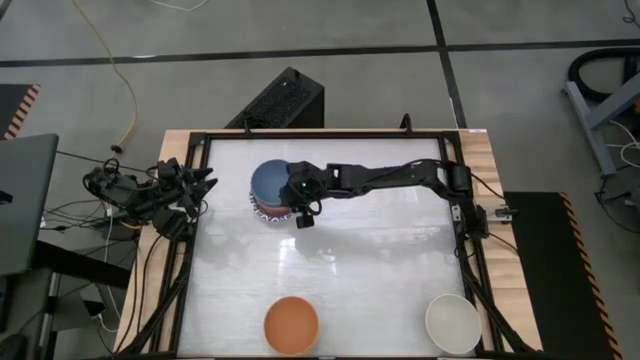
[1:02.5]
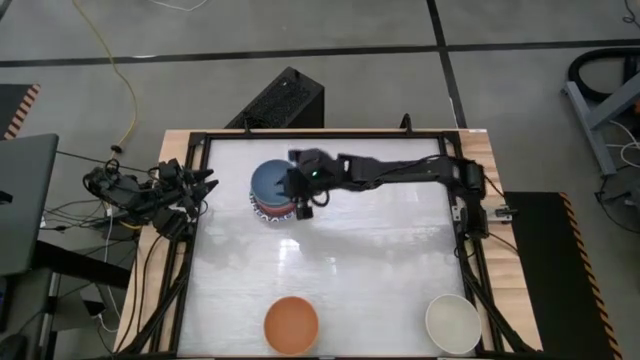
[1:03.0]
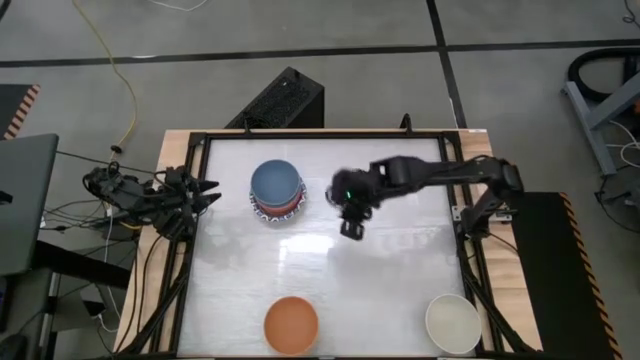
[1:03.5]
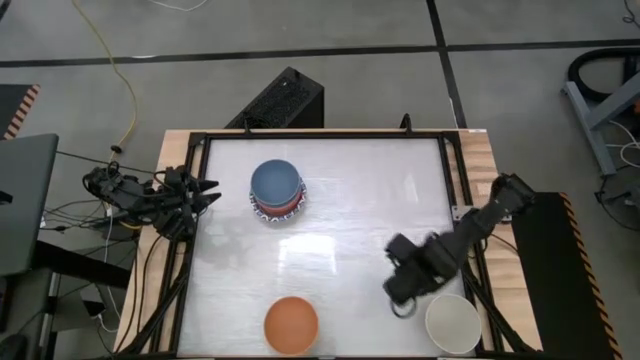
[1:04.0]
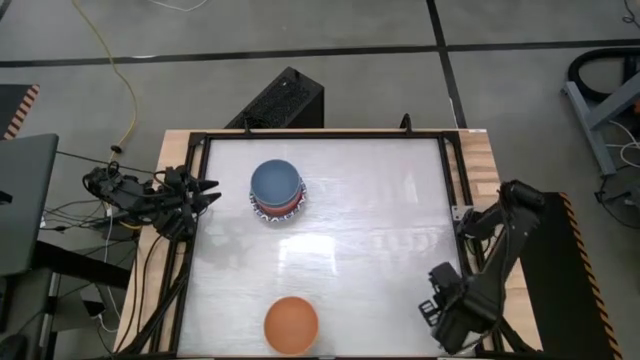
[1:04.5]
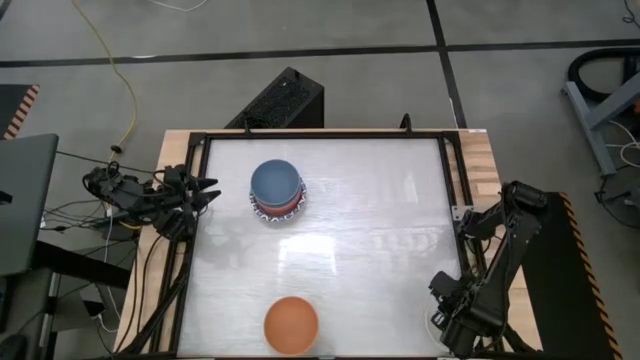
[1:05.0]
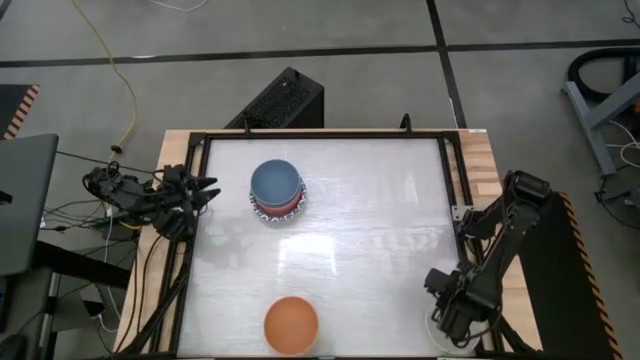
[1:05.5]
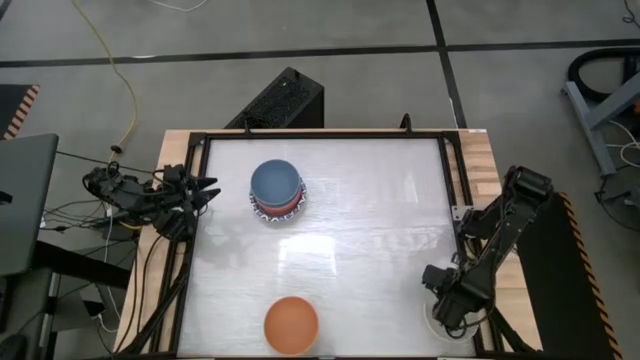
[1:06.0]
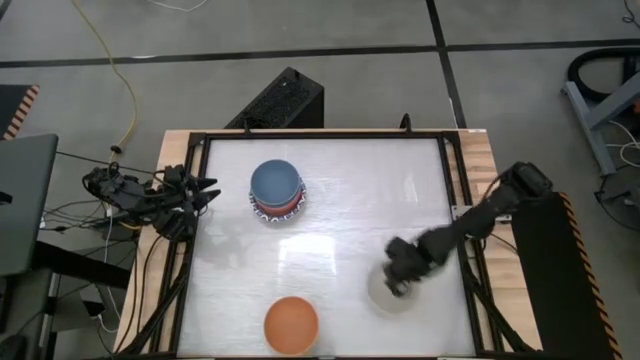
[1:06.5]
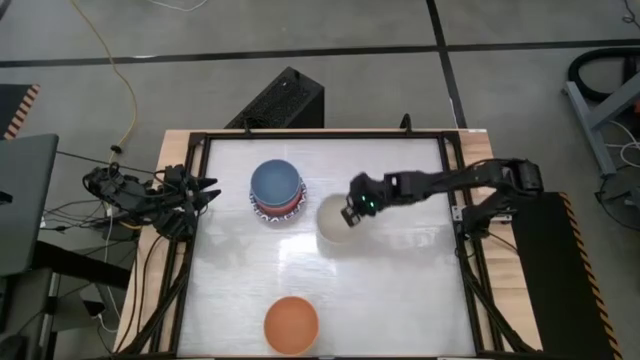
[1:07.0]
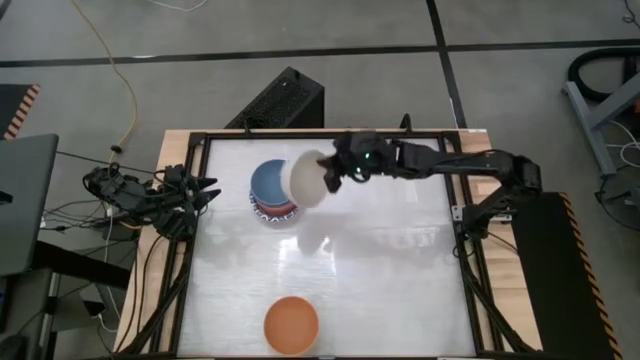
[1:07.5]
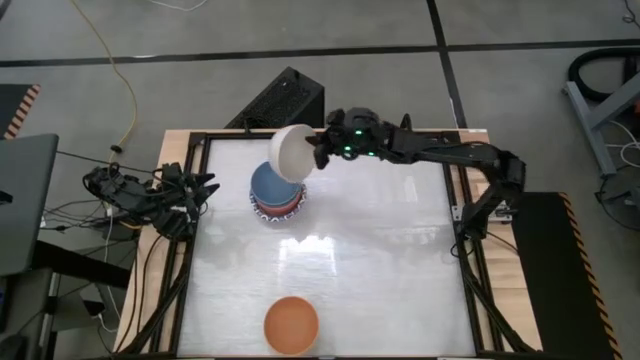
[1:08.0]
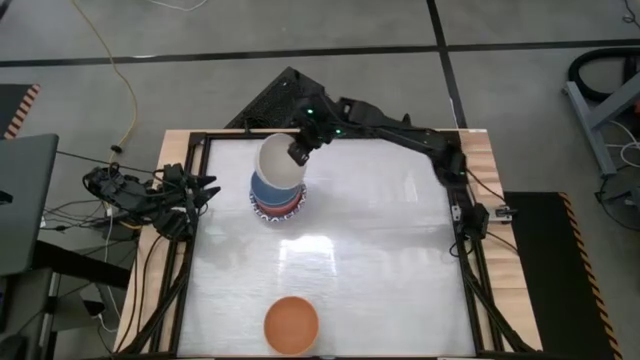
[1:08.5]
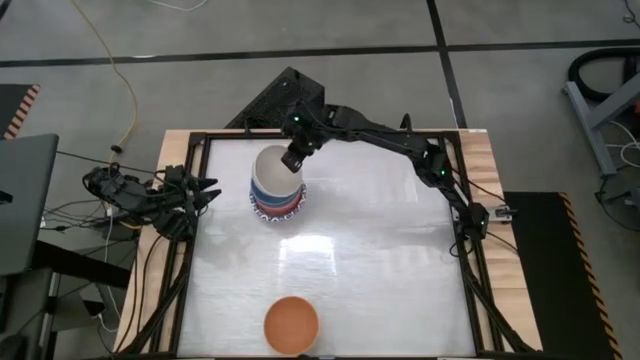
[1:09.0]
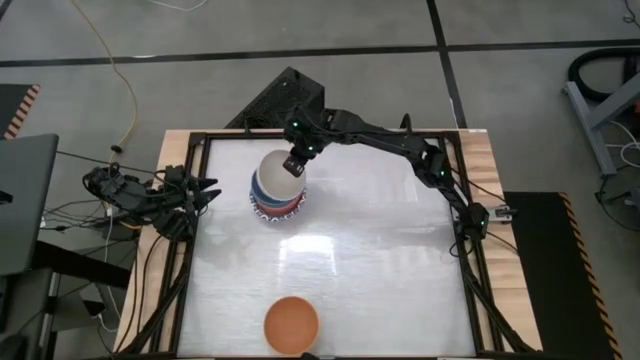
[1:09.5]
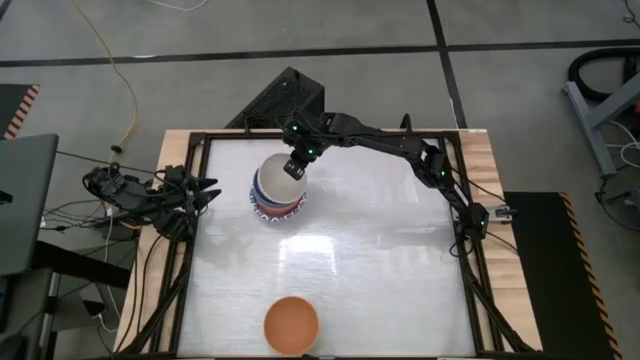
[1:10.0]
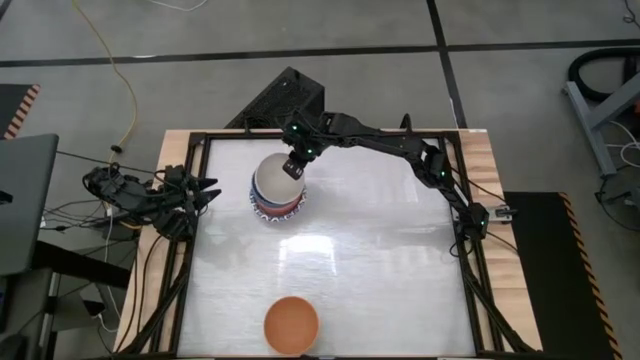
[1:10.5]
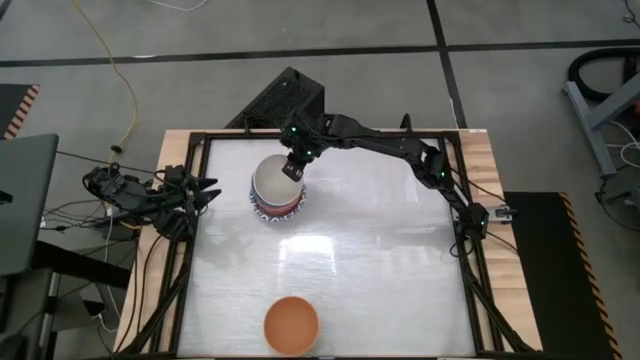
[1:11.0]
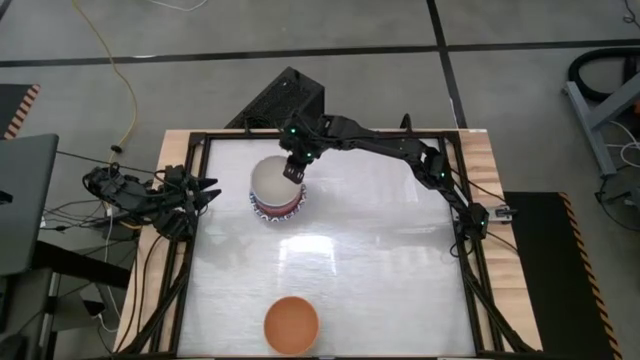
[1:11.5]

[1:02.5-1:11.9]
Stack the white bowl on top of the blue bowl

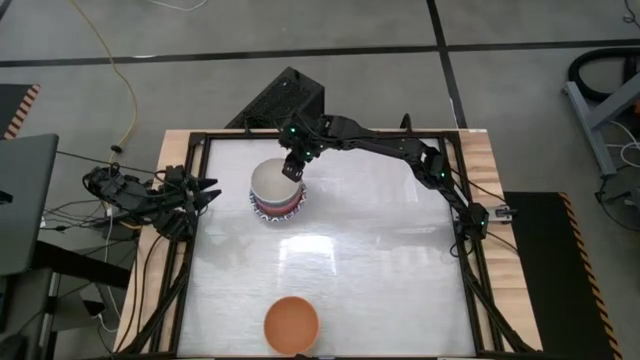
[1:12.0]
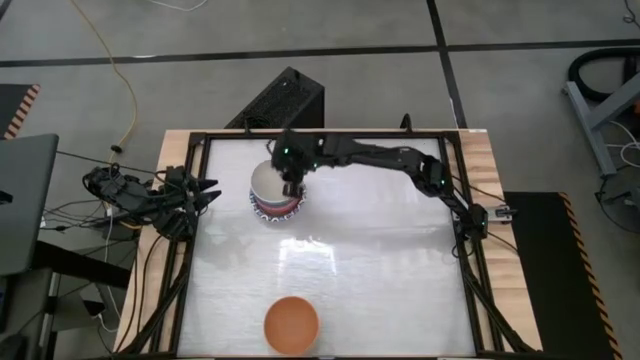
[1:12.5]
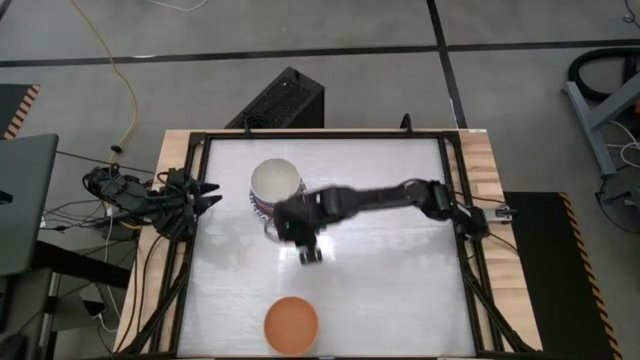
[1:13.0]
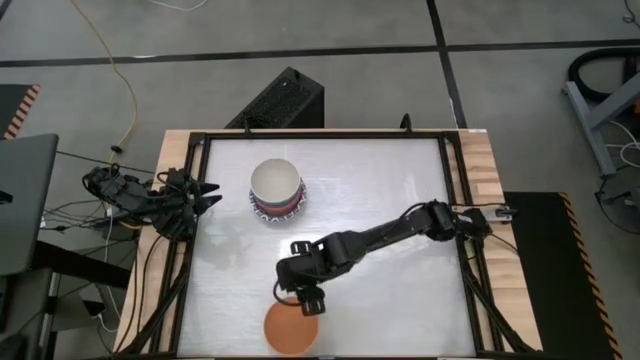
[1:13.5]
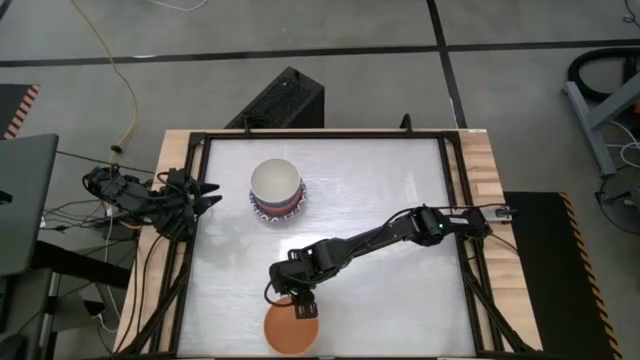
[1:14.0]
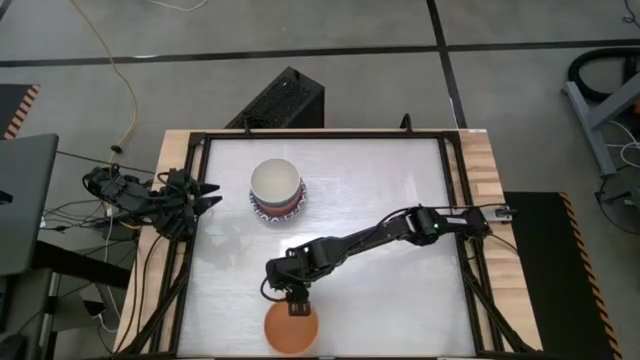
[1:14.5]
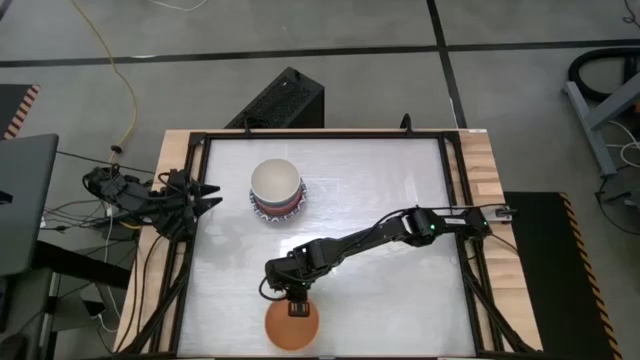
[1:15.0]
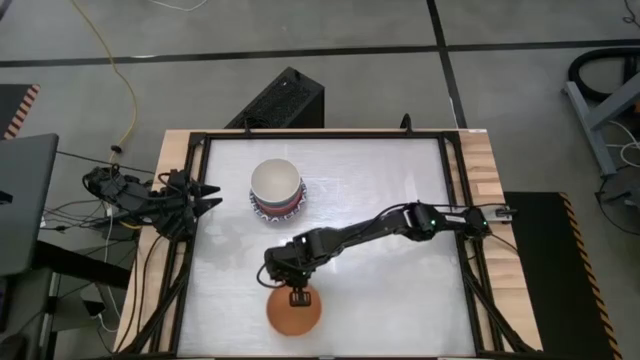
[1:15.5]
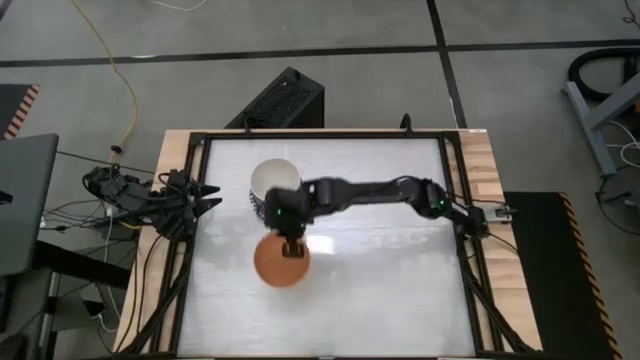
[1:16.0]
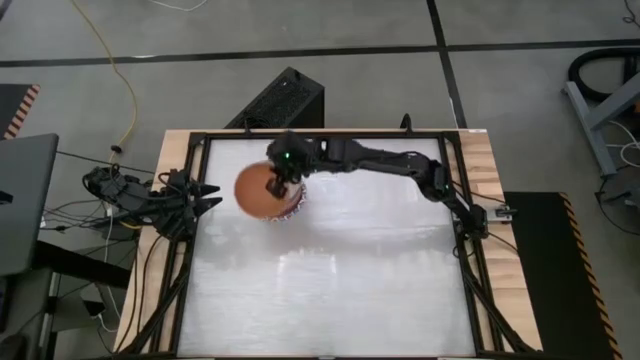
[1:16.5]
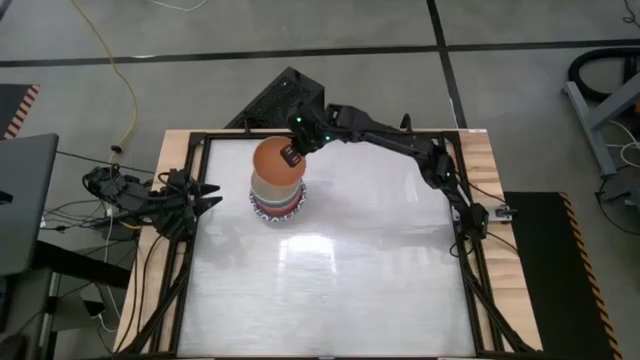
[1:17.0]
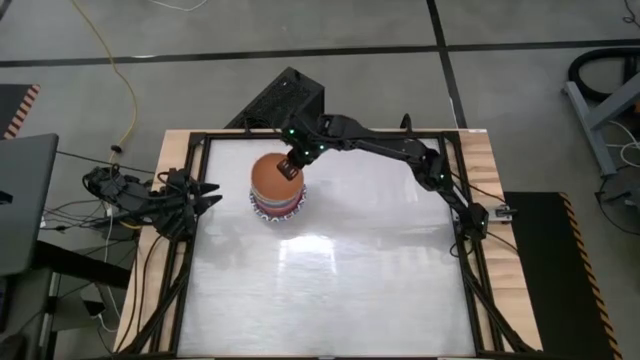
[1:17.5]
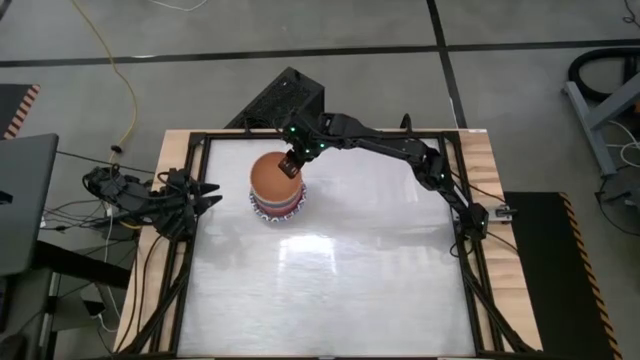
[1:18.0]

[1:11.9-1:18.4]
Stack the brown bowl on top of the white bowl
